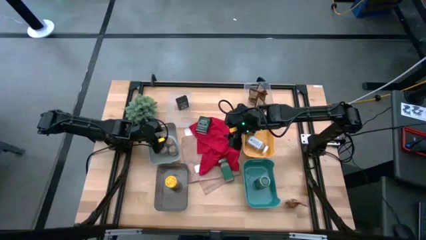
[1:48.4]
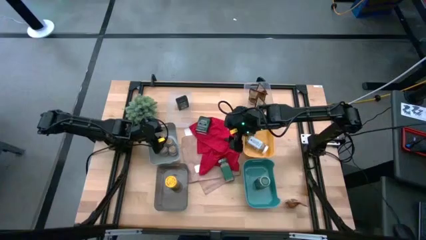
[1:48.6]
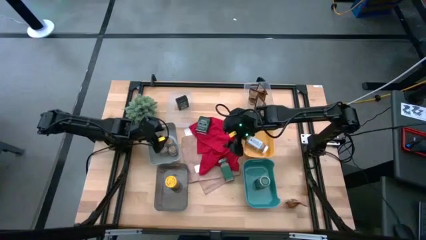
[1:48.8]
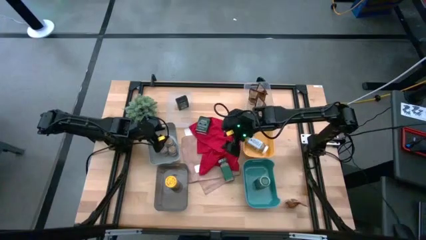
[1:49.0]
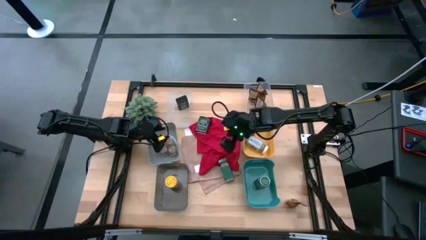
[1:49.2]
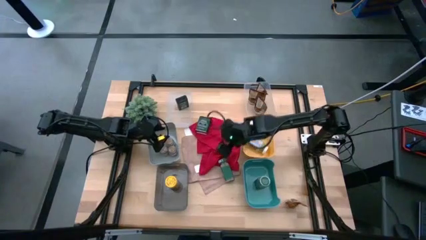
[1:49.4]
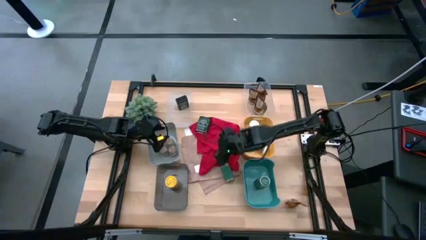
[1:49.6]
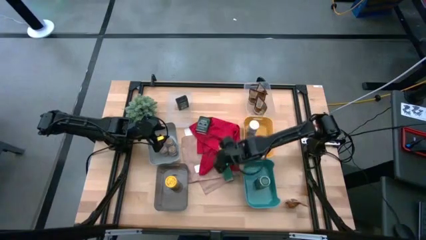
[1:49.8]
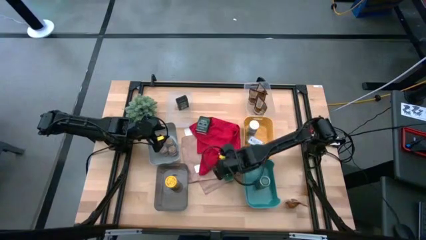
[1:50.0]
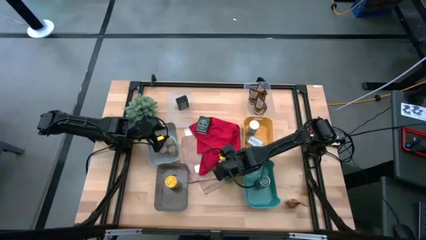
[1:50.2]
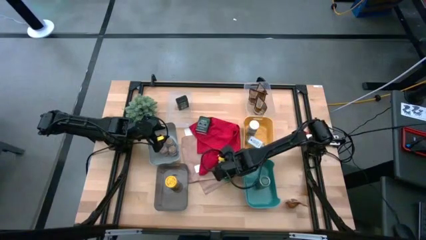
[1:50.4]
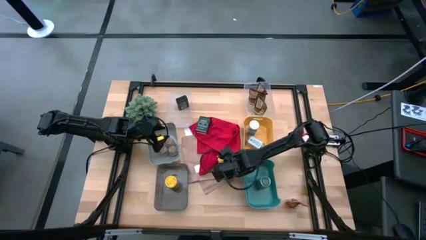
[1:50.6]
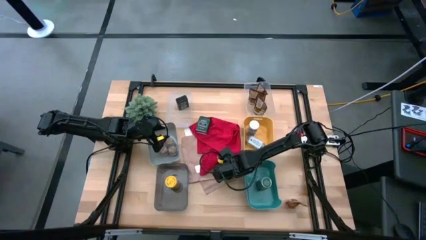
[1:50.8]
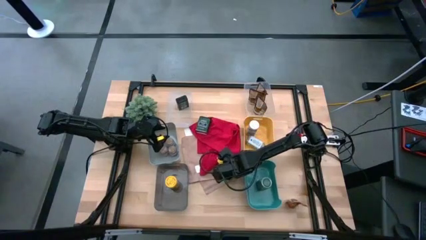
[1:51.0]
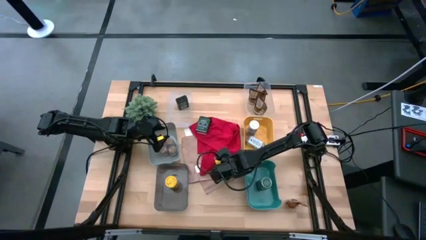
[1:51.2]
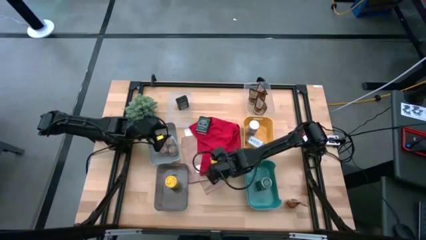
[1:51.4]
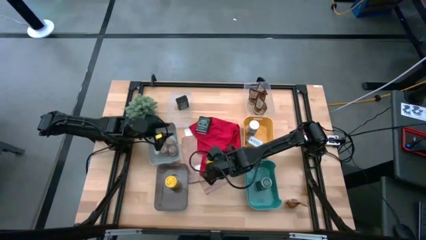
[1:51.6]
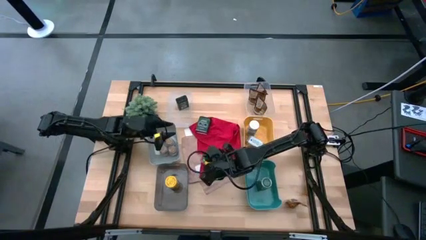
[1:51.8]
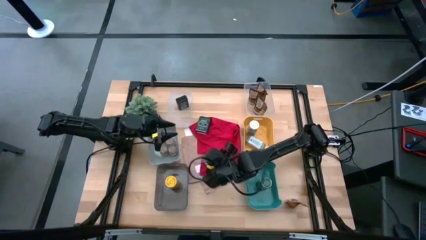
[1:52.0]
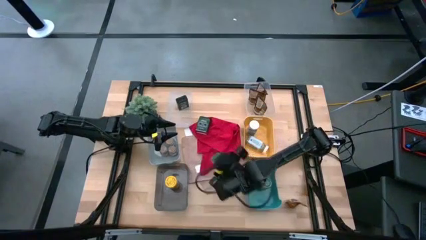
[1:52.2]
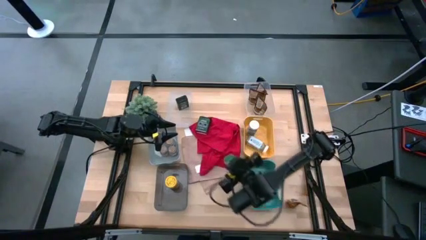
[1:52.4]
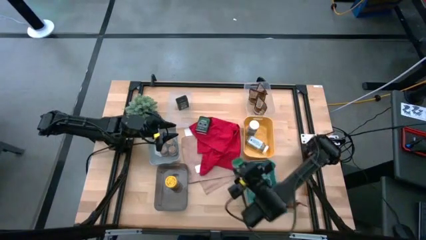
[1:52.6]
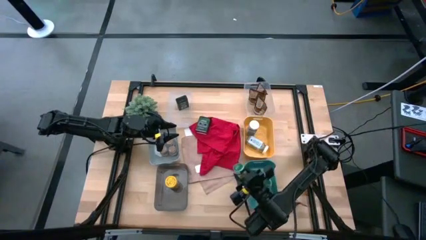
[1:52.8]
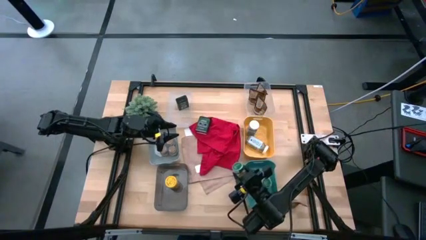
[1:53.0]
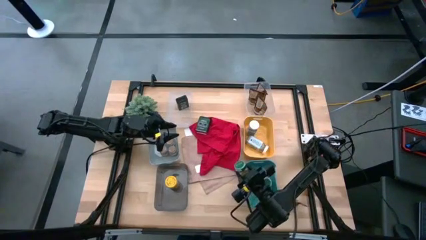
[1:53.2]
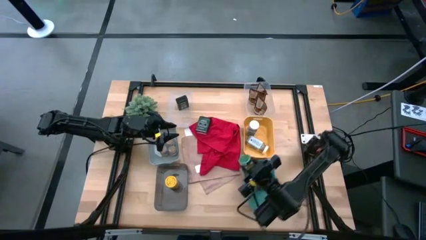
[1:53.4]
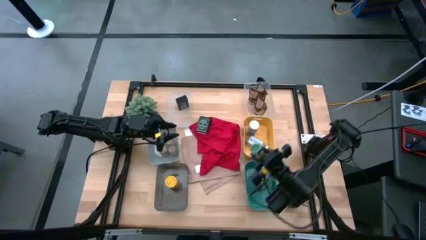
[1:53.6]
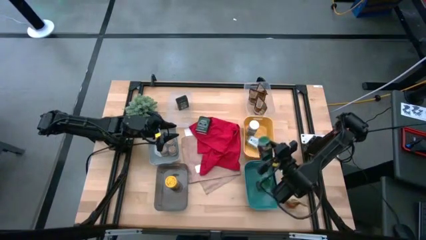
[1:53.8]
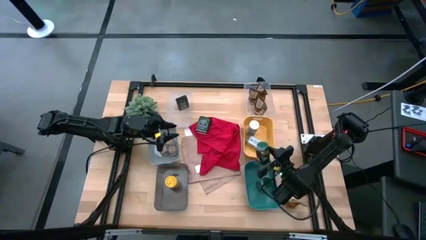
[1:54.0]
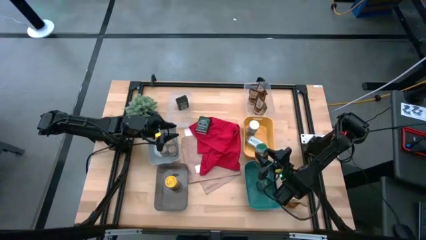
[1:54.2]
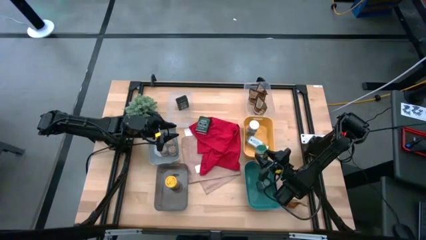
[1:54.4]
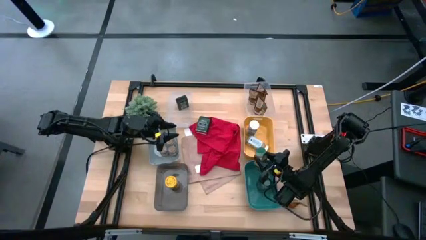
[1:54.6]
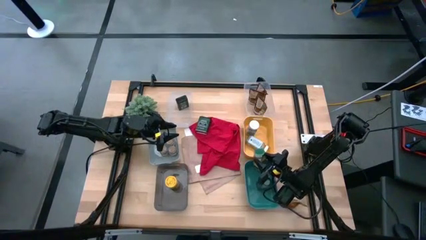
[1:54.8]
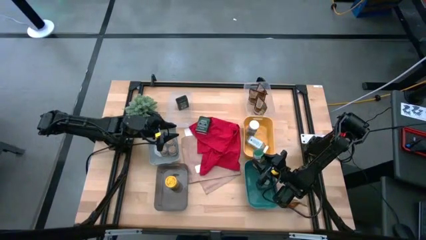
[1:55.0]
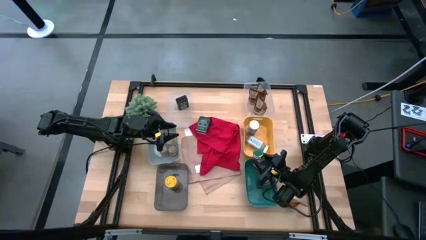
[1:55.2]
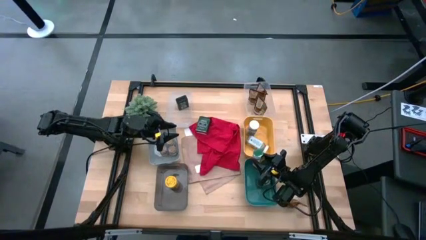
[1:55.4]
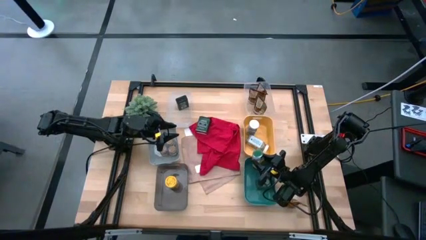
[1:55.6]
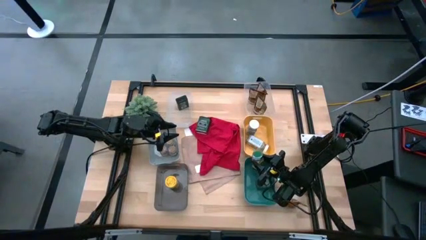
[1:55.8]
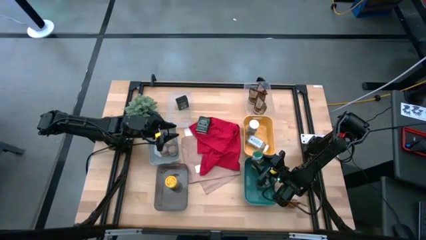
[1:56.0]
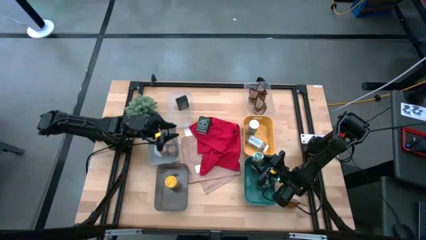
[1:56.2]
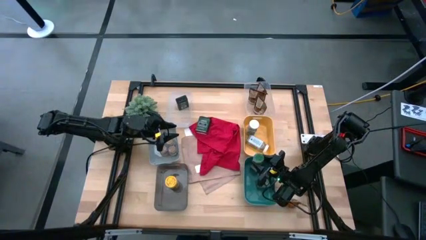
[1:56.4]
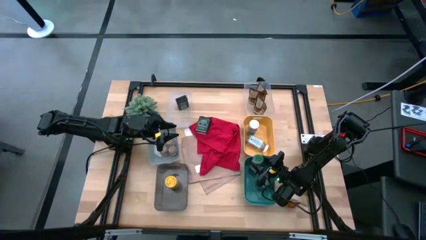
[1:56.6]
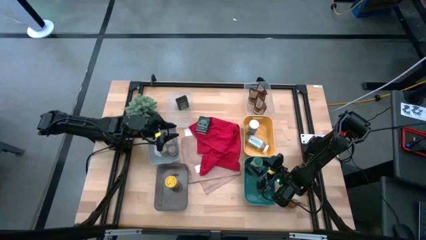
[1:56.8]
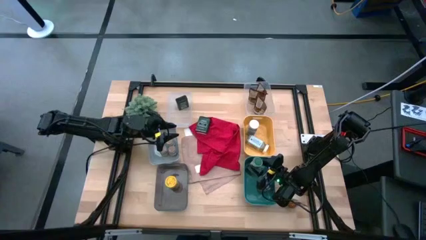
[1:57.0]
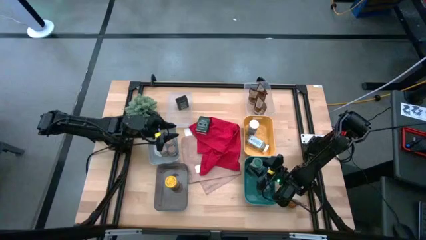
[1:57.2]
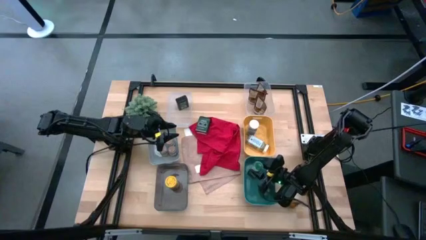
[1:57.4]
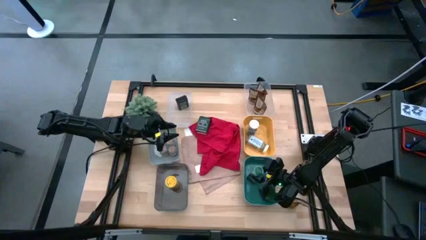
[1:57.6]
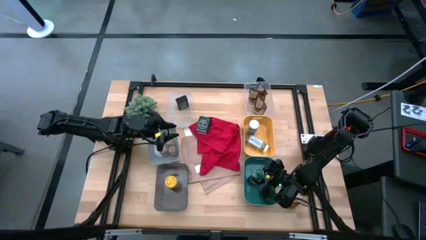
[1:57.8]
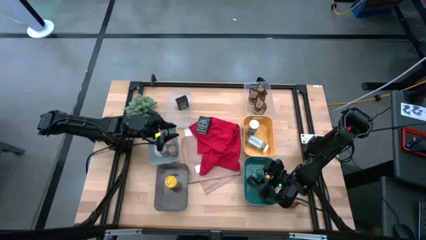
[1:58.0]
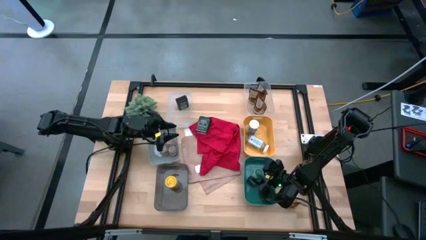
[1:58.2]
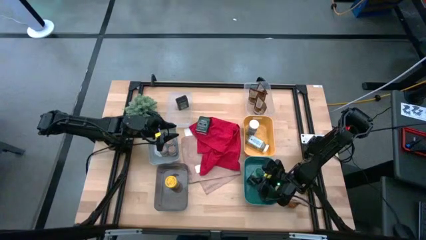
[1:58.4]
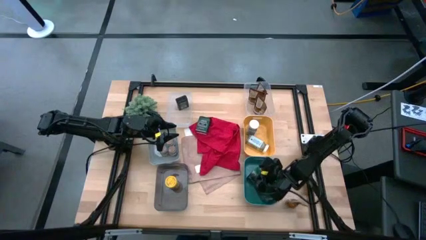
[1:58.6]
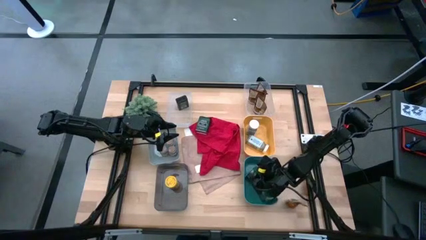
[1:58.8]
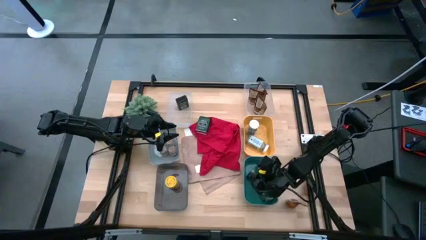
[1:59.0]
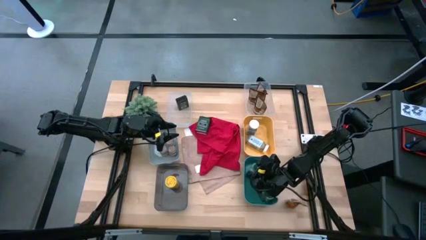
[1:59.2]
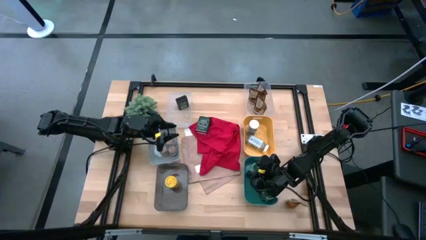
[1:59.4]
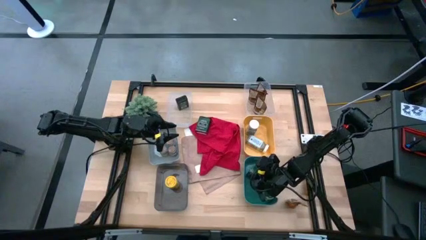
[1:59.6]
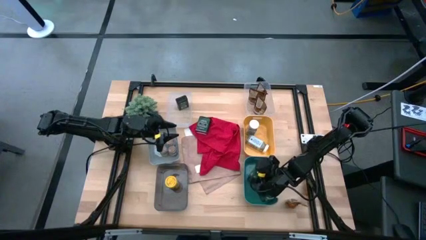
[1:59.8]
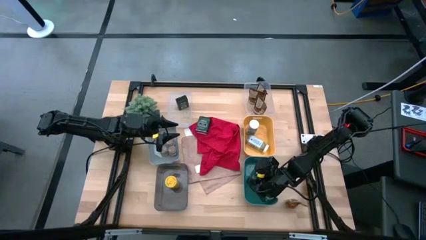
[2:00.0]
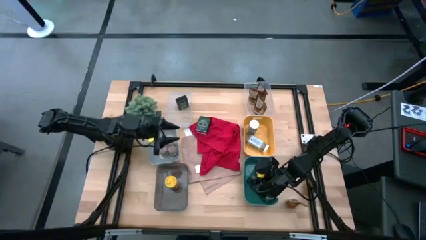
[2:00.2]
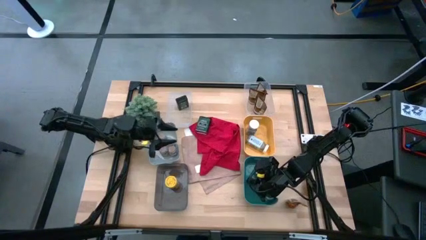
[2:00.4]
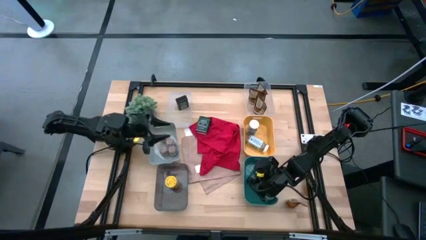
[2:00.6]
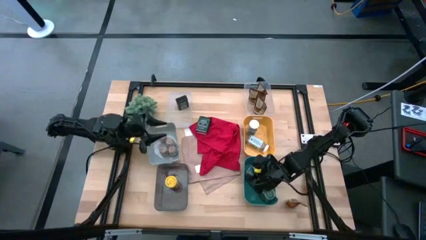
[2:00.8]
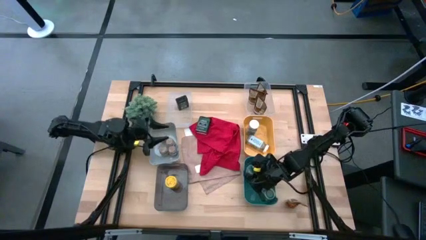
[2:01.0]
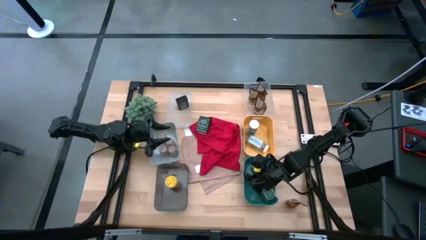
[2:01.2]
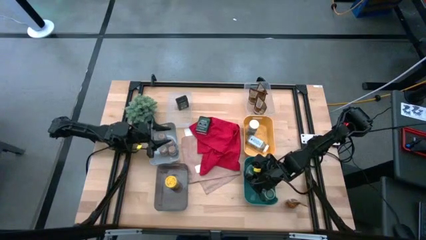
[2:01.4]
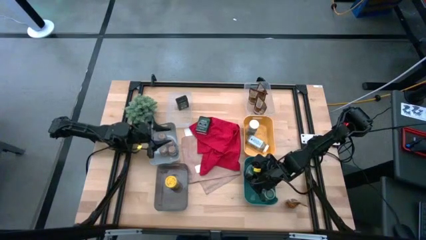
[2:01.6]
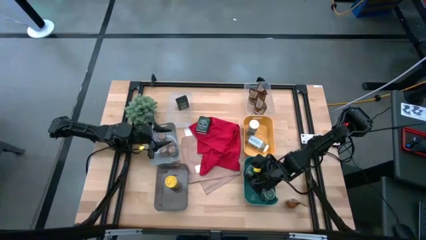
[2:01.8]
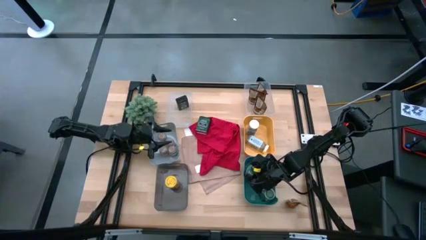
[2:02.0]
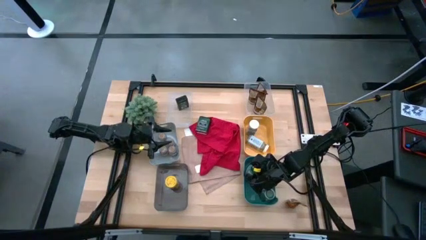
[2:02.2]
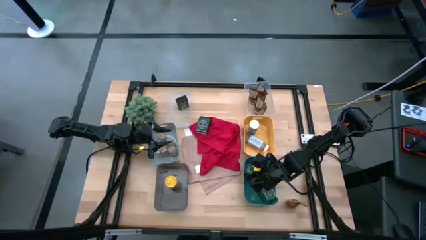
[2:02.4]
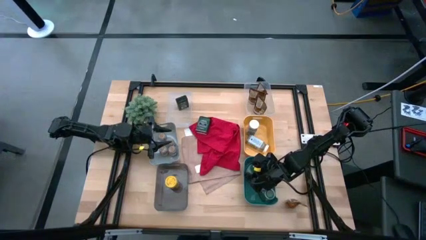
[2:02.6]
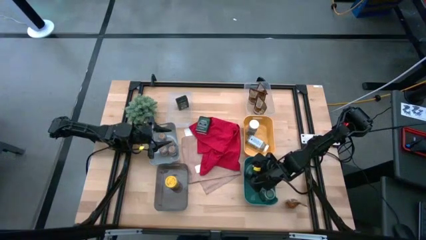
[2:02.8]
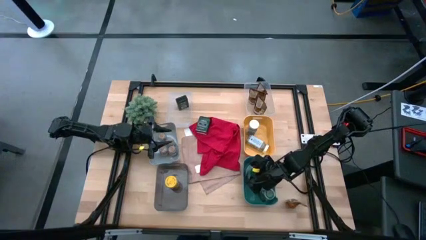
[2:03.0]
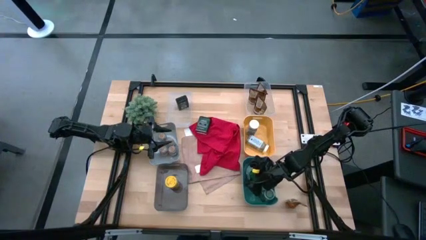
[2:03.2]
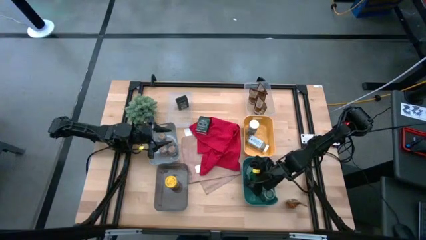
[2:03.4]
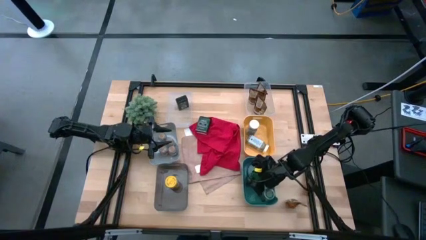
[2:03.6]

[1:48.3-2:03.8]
Task: Sort spices by type
Put the green seasoning bottle into the green bin

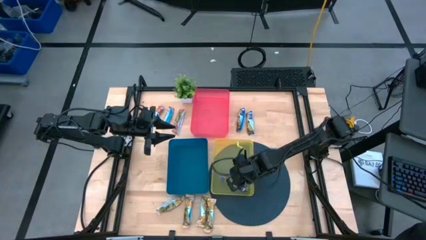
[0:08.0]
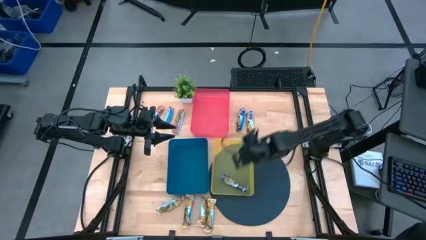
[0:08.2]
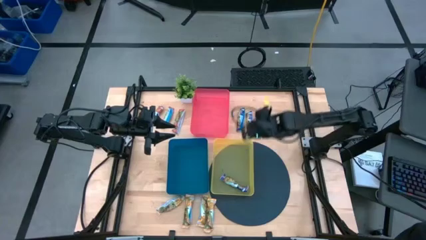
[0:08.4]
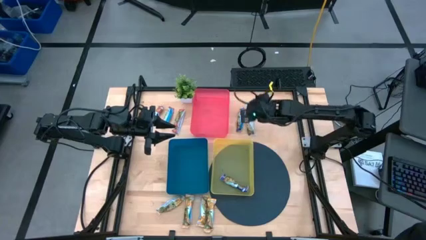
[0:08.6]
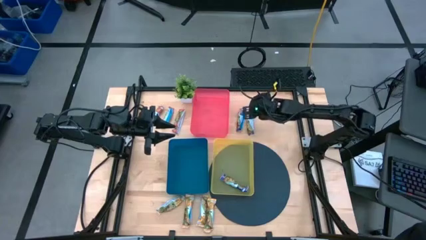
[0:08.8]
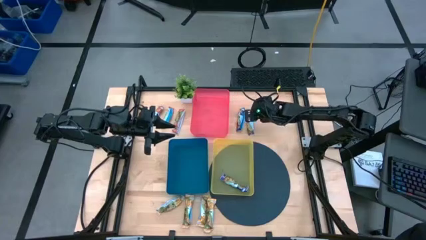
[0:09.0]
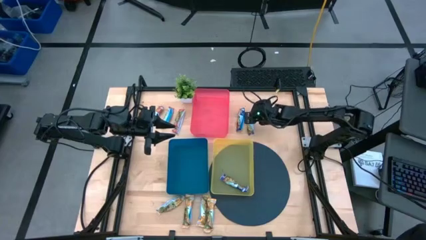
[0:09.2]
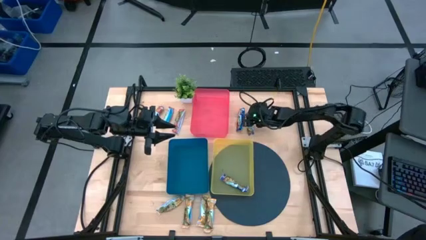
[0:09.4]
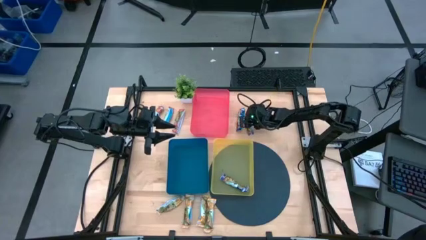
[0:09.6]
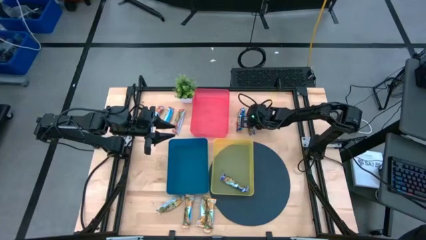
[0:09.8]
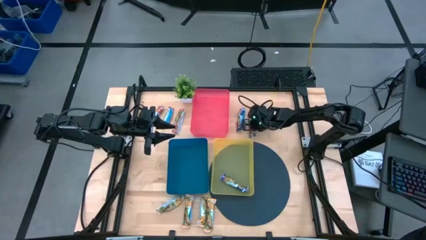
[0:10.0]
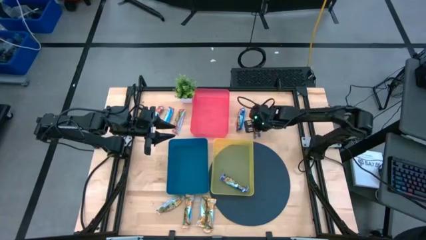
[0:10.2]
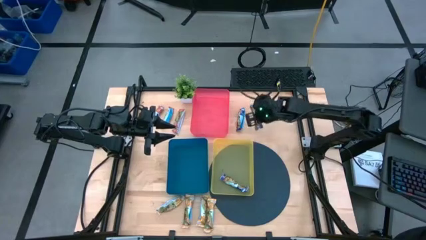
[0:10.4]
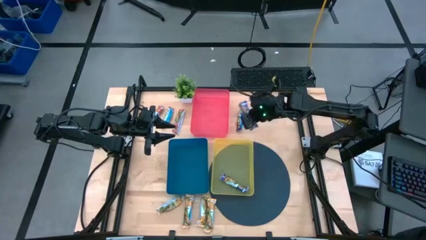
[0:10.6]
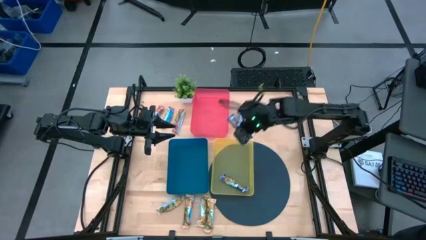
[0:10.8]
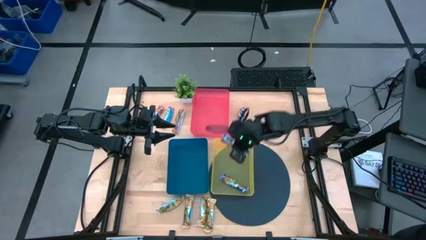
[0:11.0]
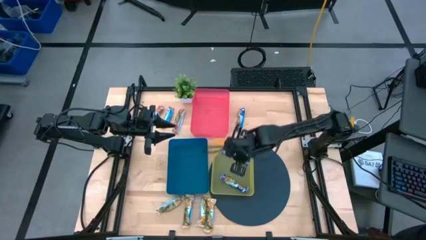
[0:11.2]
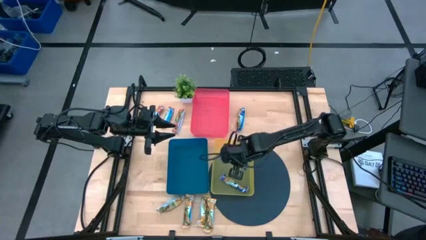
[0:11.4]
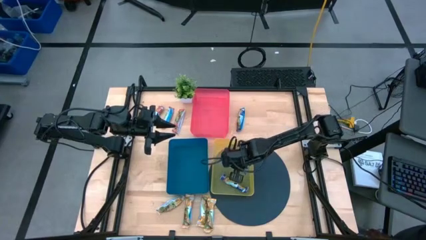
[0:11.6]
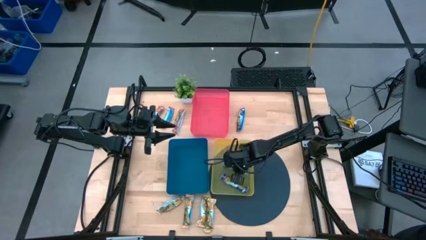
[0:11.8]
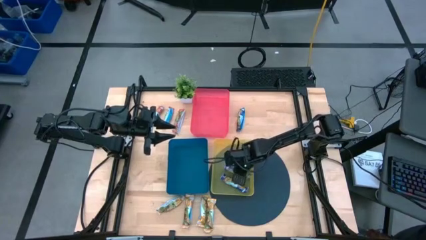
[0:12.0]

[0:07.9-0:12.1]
Task: Pick and place Granola Bars by type
Put the right blue granola bar into the yellow bin
